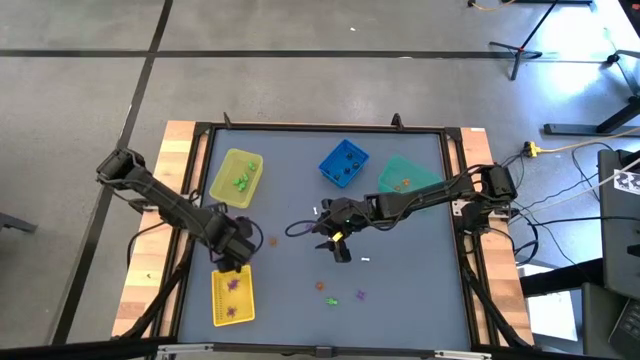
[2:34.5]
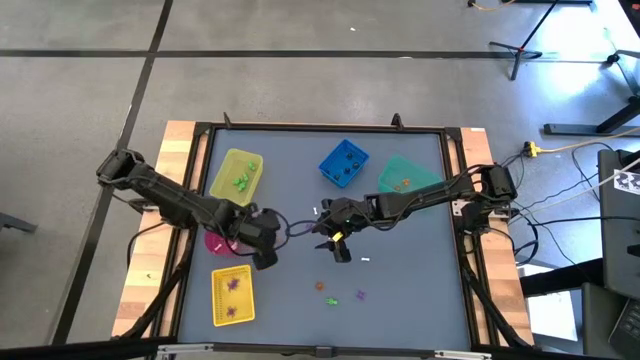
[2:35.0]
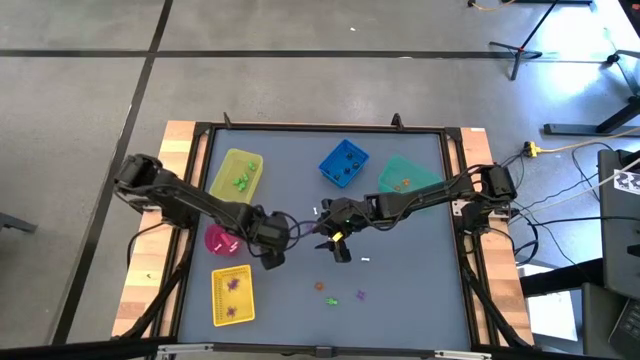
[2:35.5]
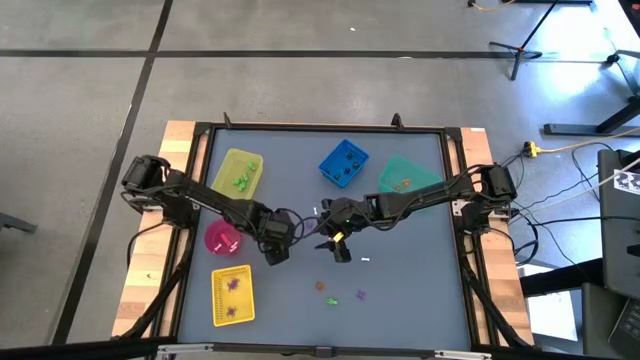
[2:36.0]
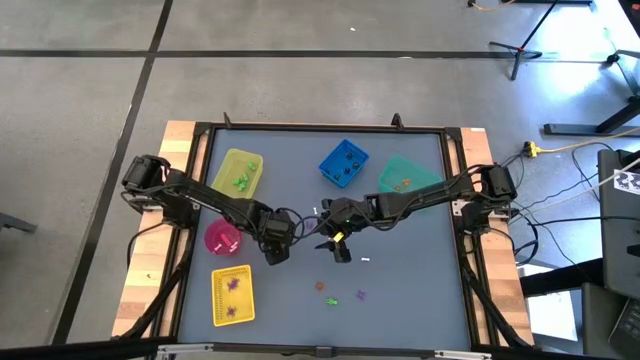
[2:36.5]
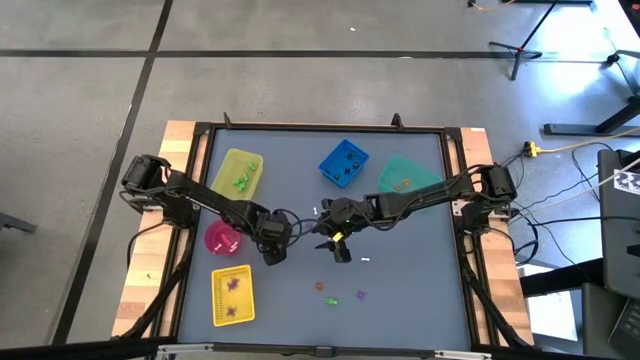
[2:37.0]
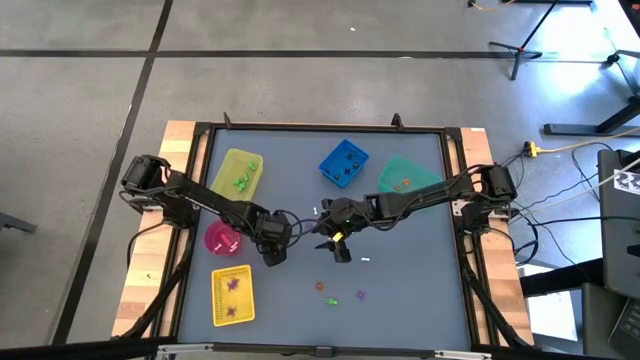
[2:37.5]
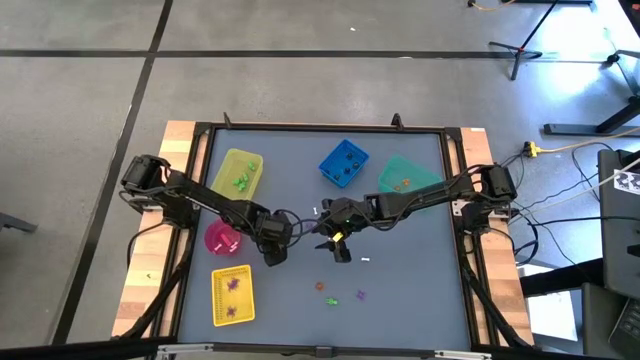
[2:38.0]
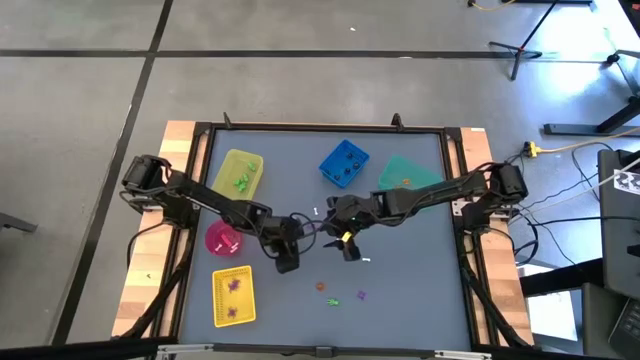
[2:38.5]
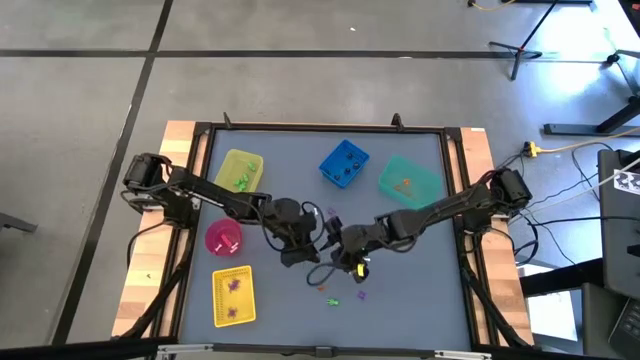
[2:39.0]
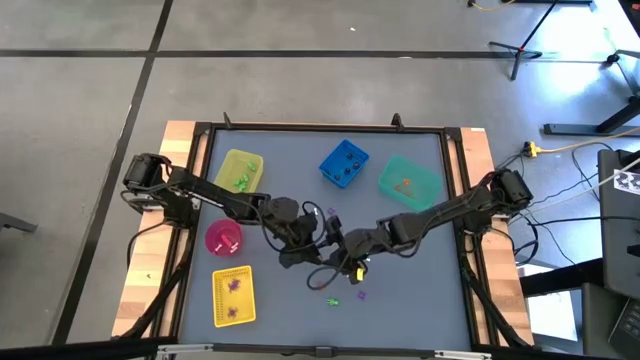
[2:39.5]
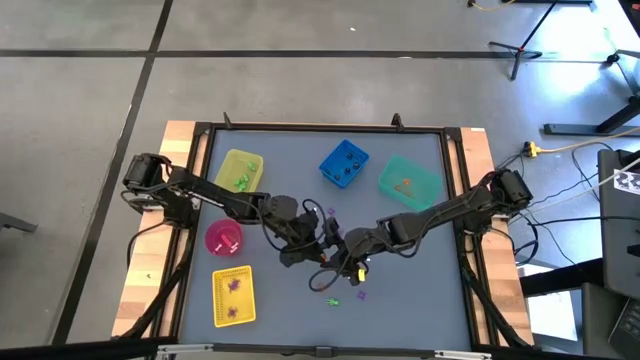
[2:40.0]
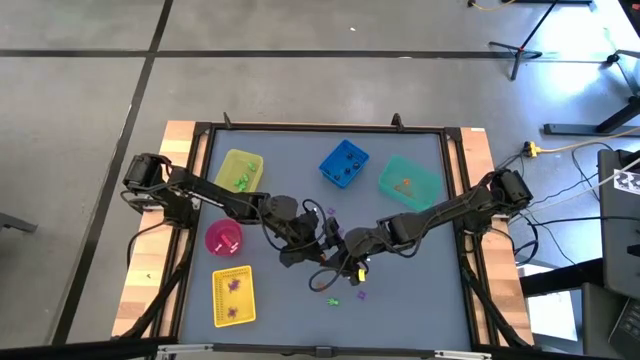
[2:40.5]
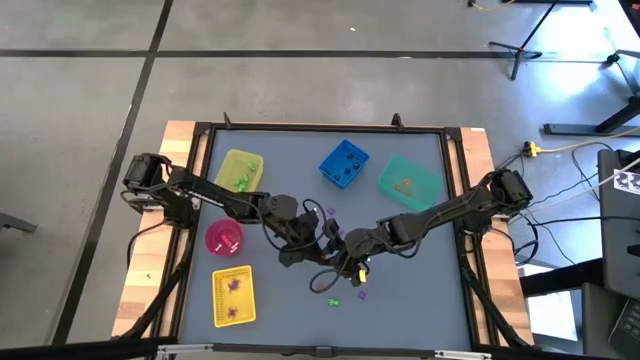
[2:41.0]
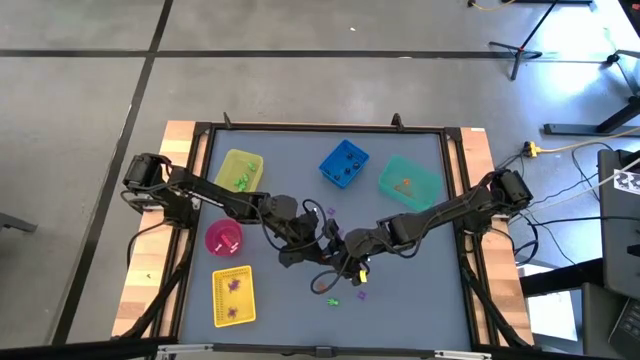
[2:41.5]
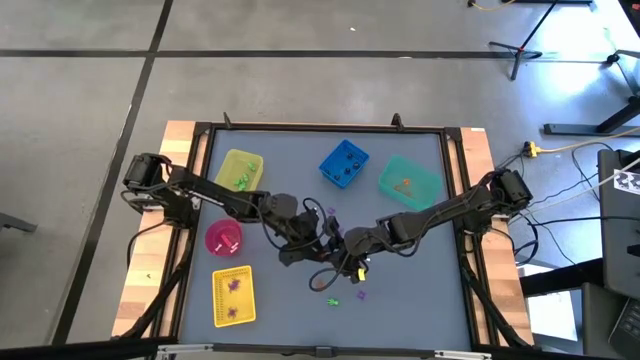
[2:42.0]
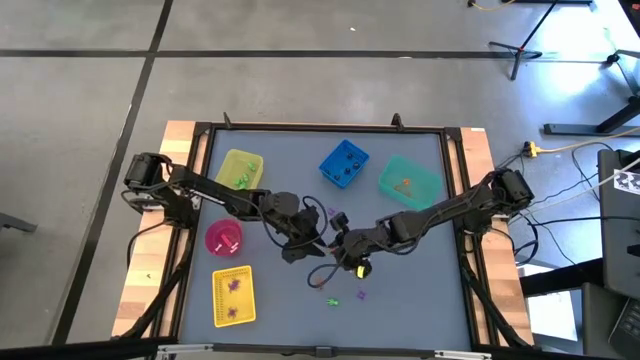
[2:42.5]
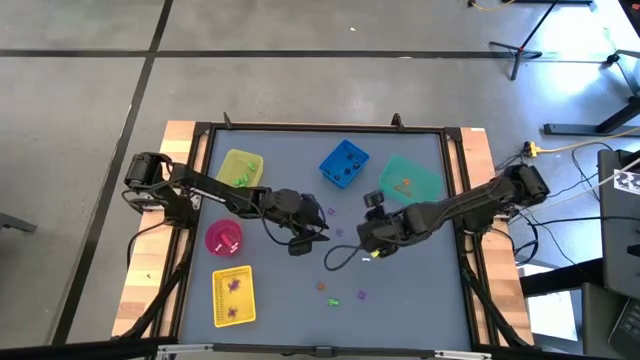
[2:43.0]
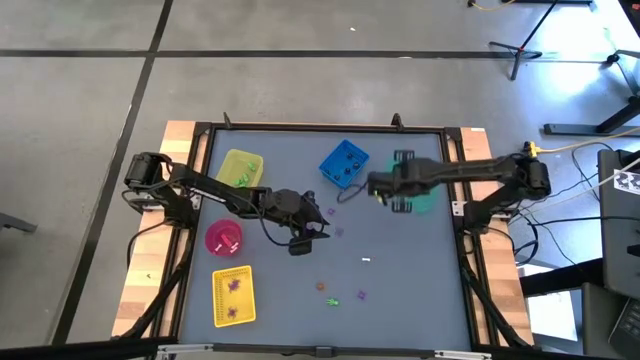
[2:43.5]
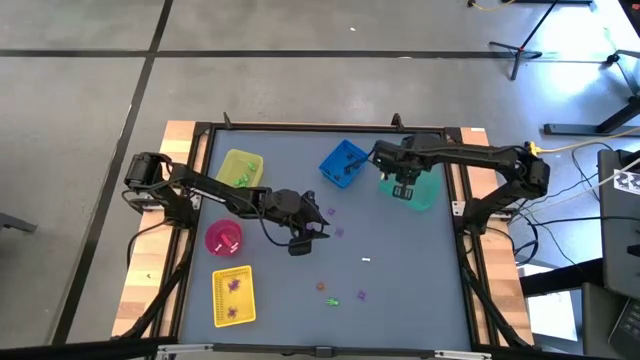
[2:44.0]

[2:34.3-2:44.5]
Task: Sort Halloween decoration
Put the orange pumpkin toy into the green bin

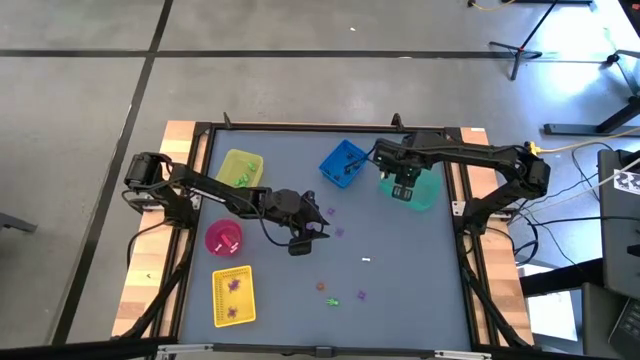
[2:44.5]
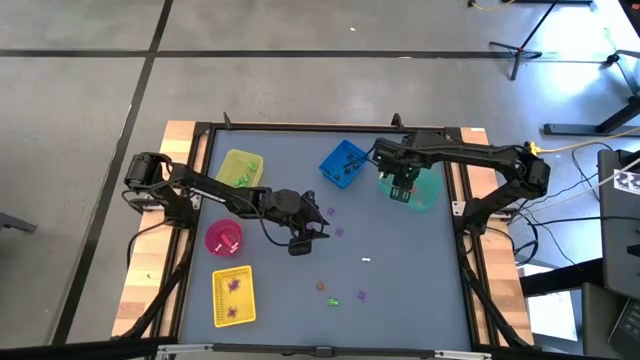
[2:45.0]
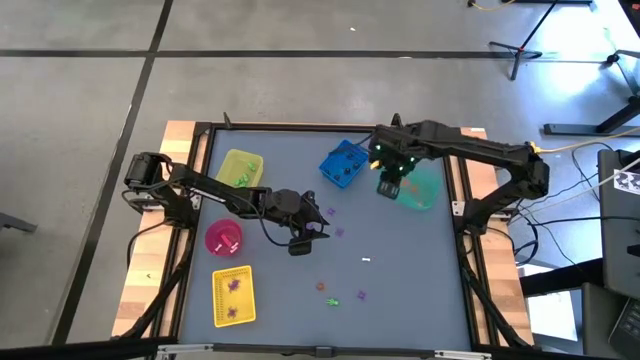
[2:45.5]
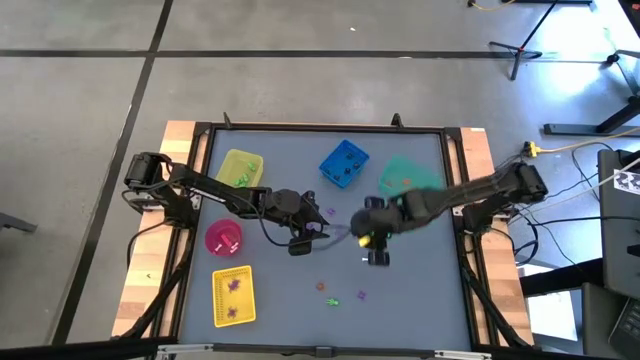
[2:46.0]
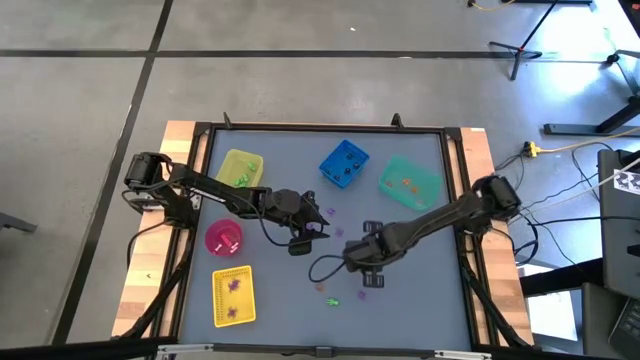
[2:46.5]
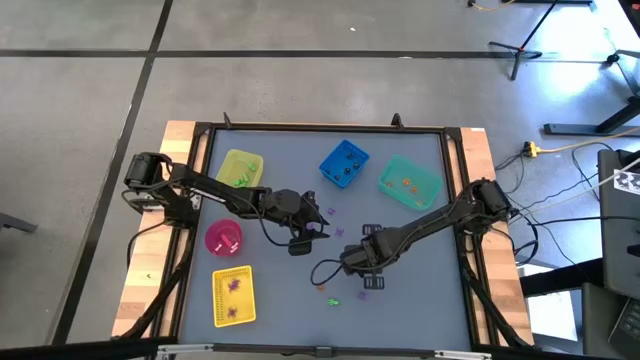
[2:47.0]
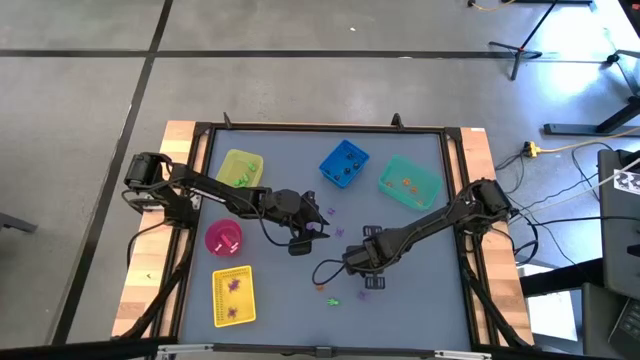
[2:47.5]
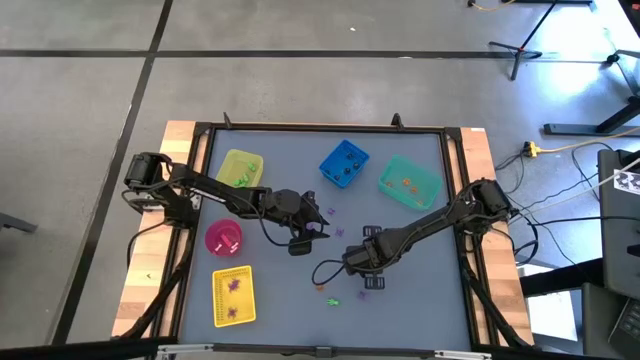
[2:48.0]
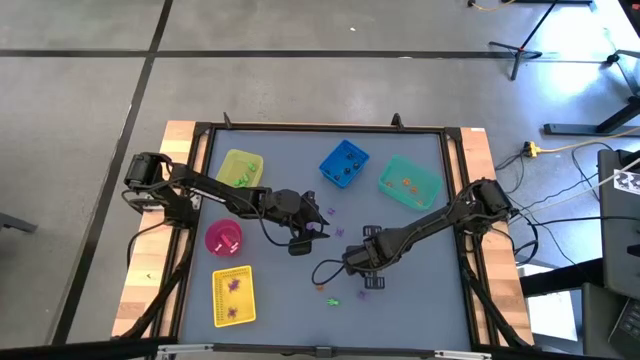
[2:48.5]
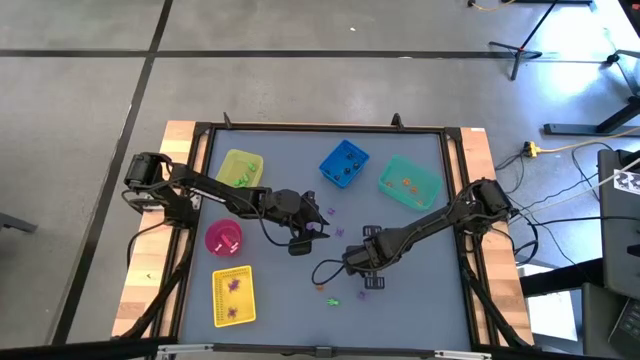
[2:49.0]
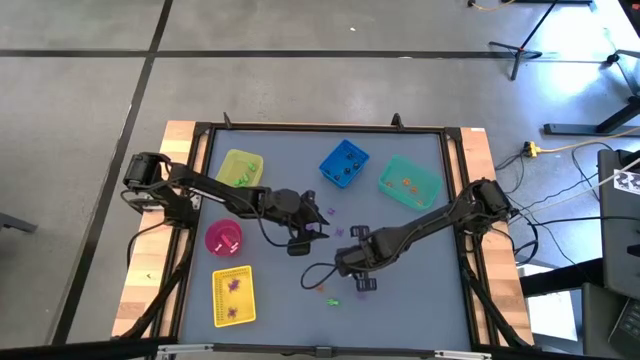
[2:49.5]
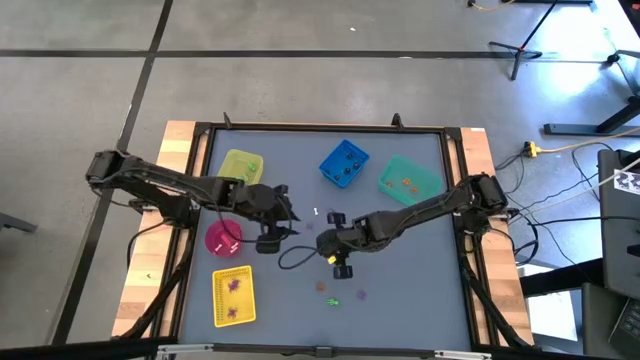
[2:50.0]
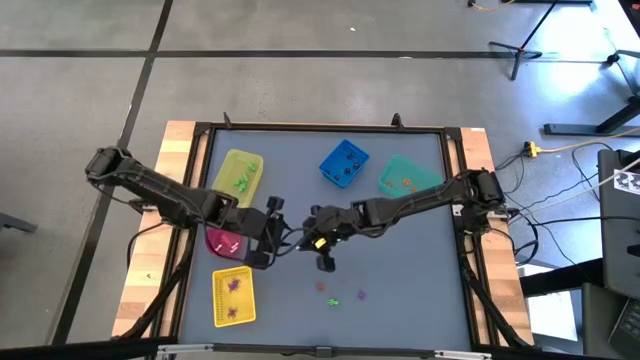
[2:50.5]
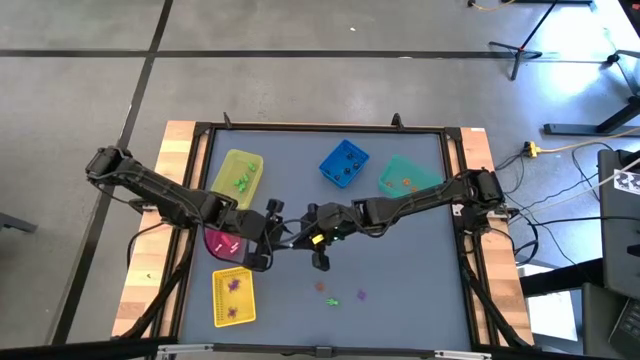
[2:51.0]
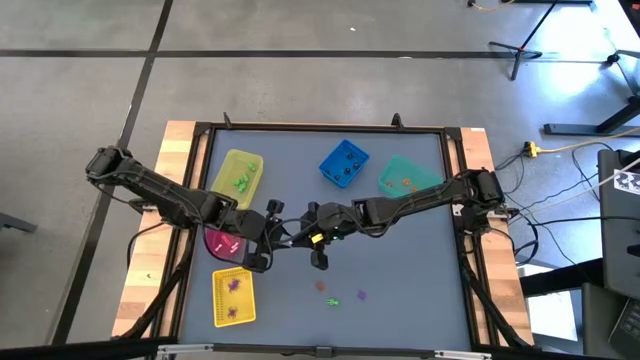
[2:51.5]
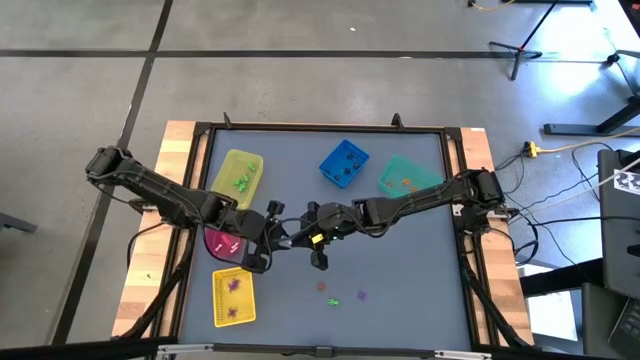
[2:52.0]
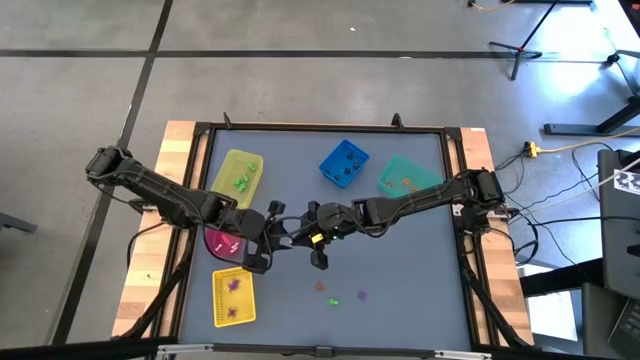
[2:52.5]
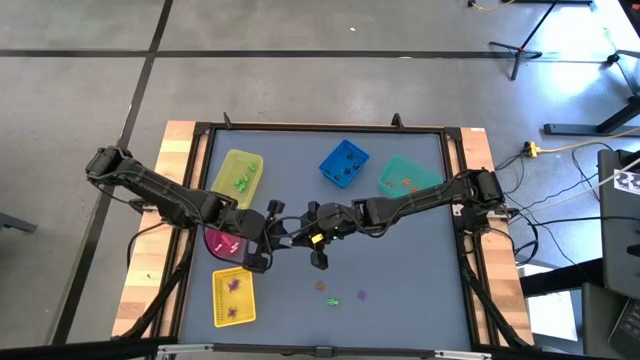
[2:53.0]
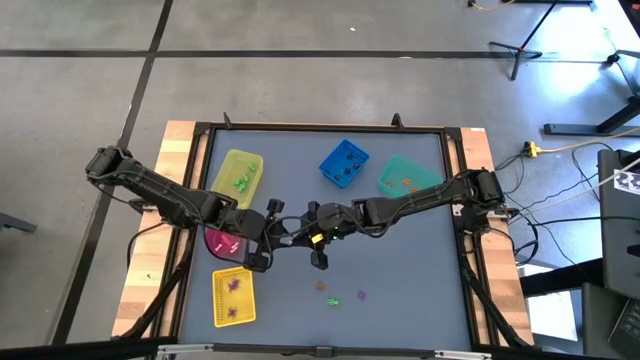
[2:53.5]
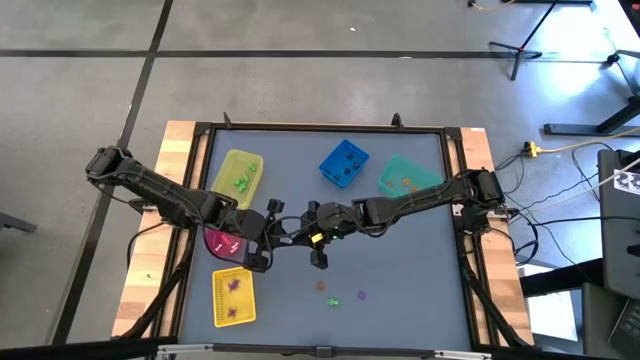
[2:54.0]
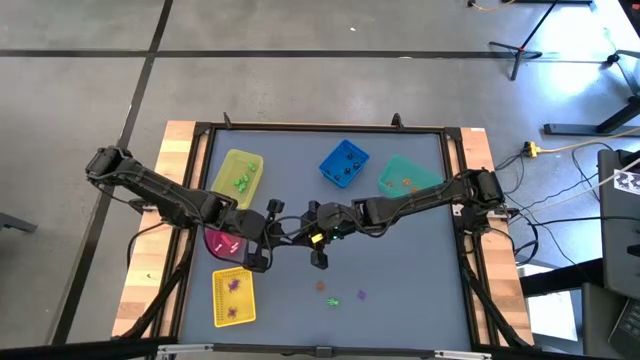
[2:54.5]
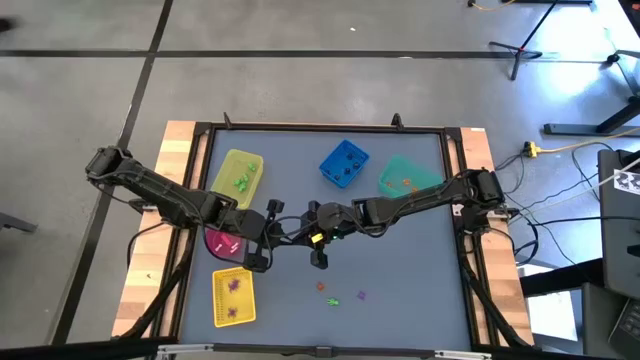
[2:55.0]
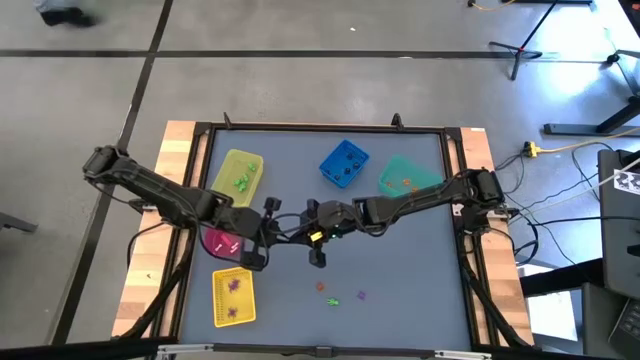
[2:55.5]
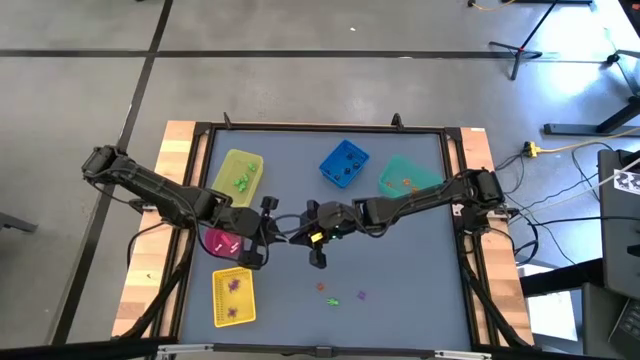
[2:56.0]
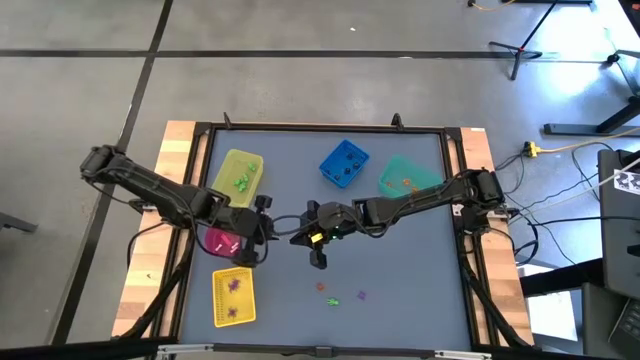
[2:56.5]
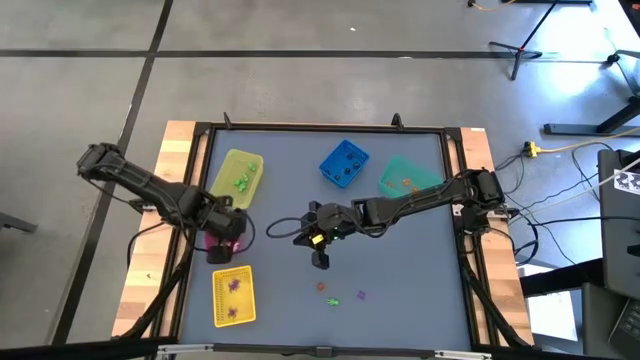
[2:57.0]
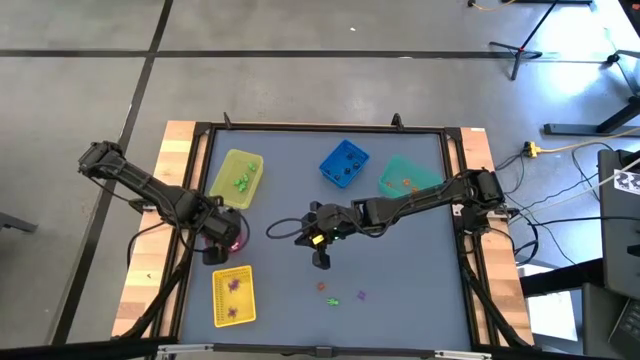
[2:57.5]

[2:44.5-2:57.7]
Put the white bone toy into the red bowl
